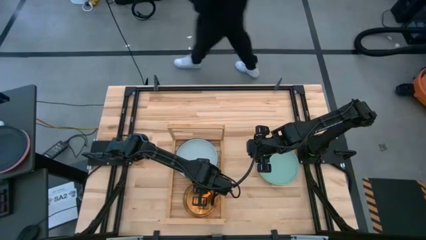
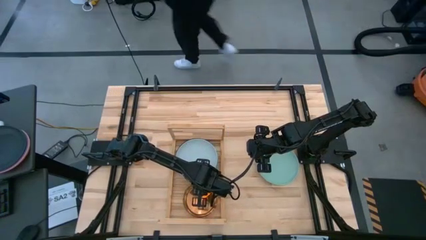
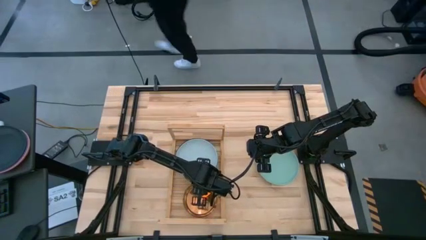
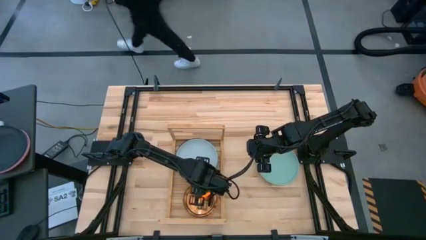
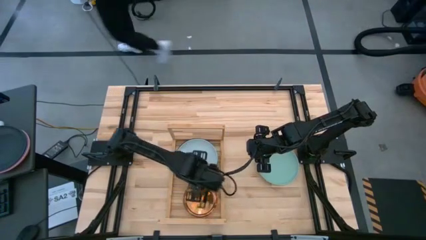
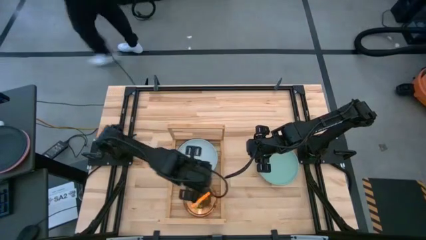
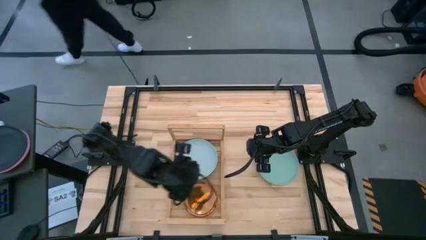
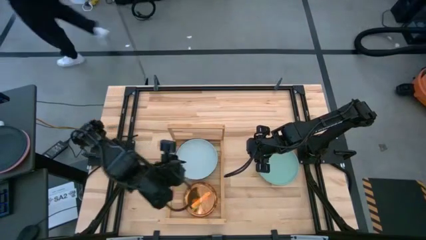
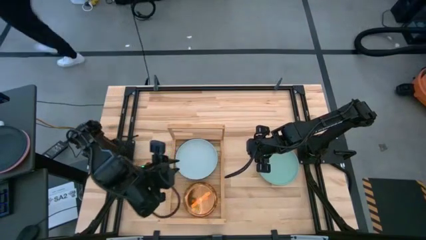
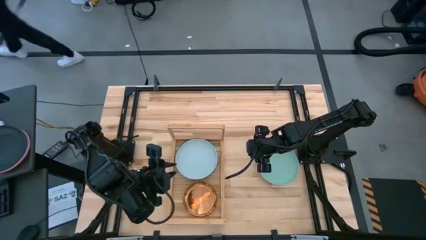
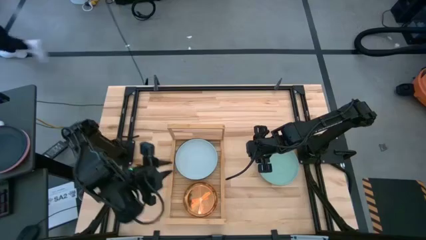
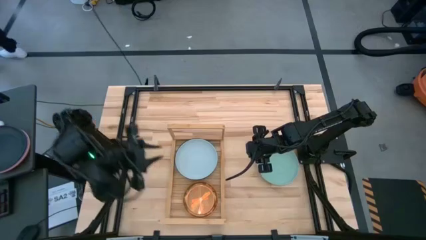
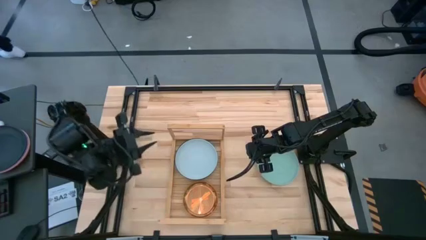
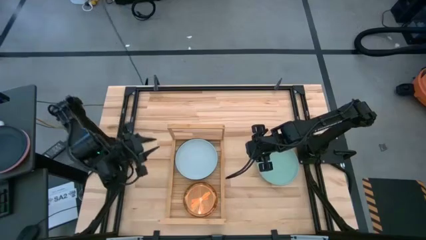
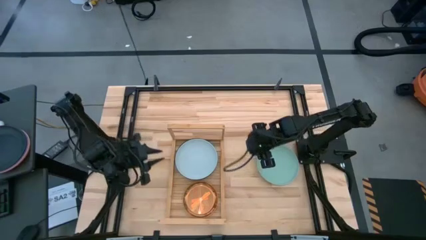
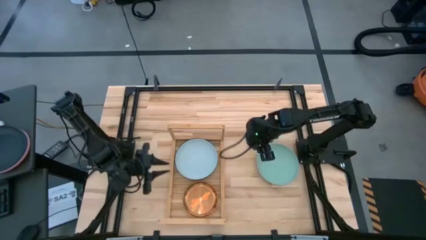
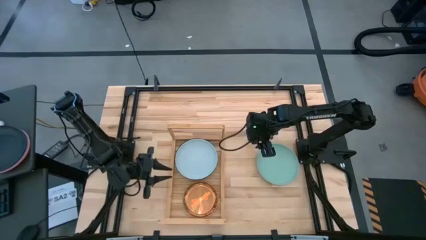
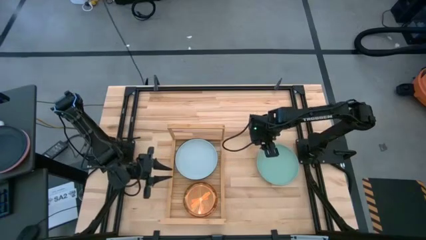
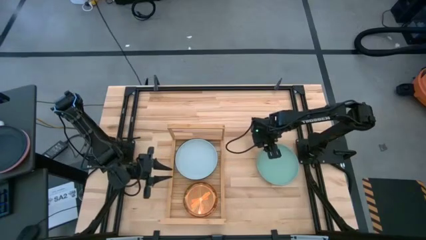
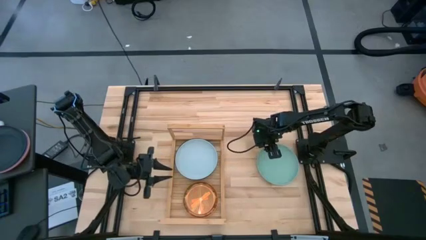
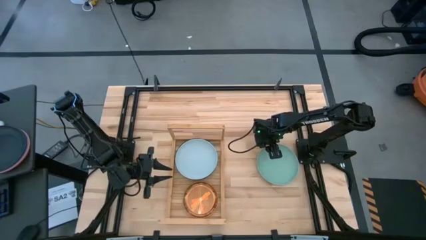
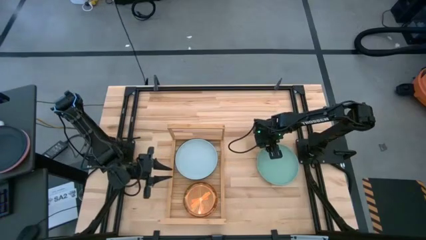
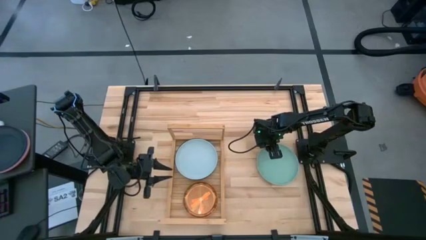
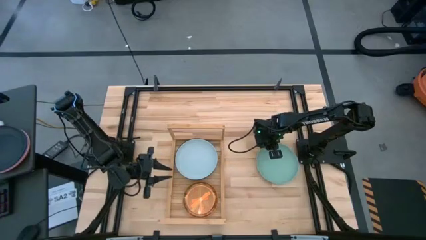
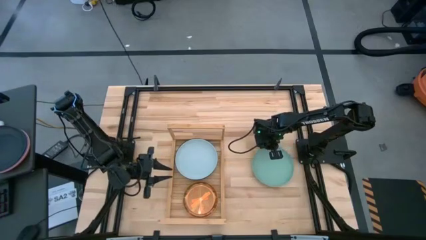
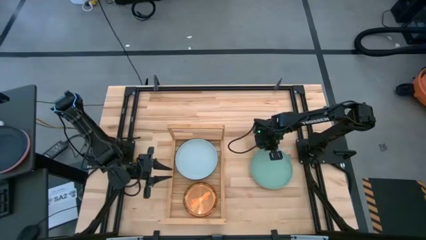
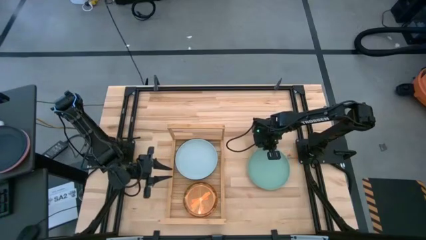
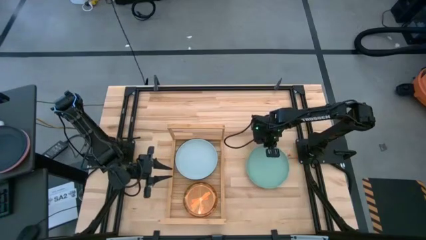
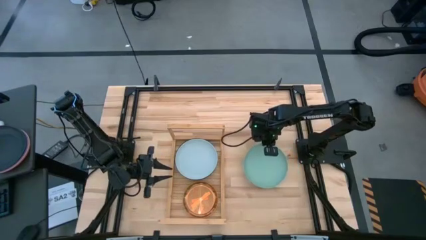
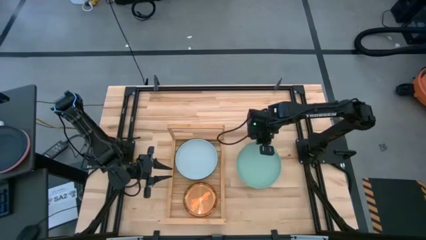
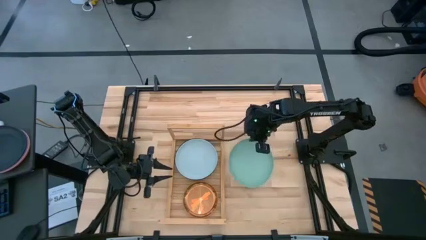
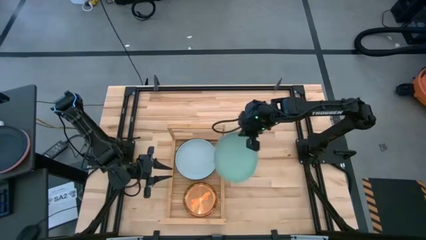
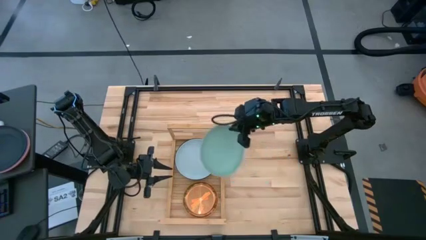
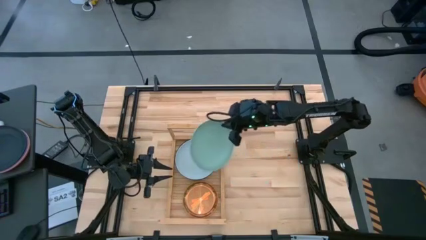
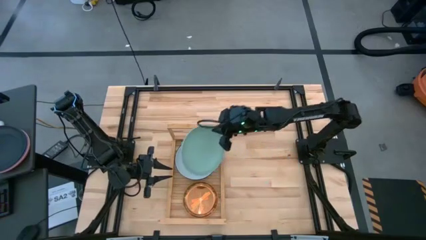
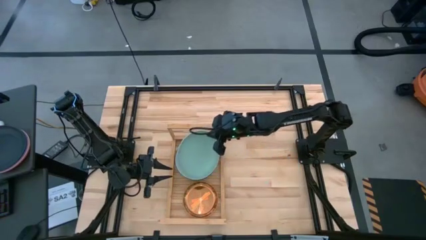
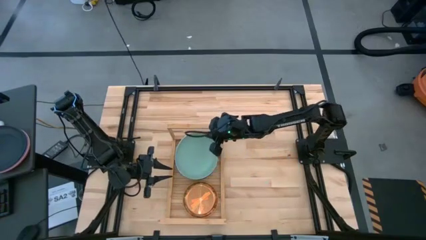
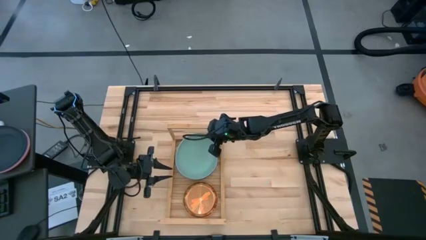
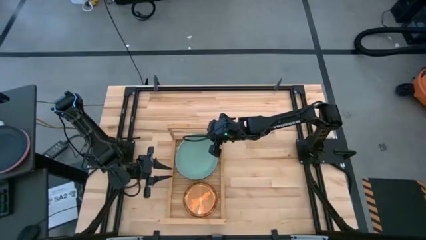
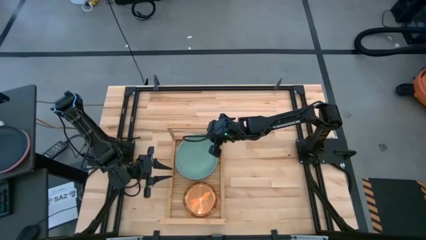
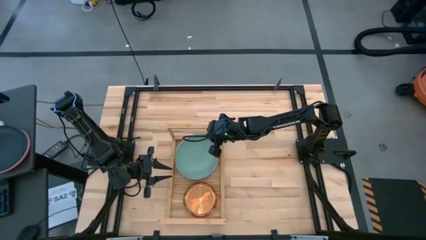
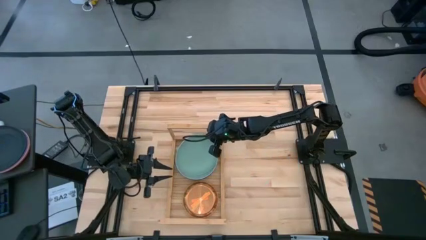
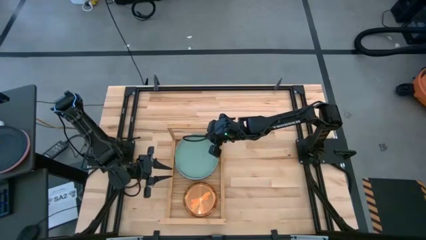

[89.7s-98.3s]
Task: Place and stack plates onto a shelf
Stack the big green plate on top of the big gray plate on the shelf

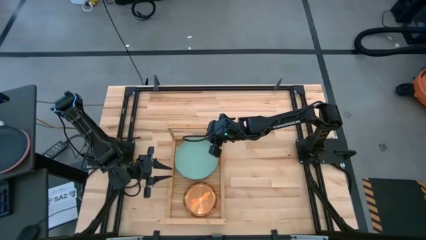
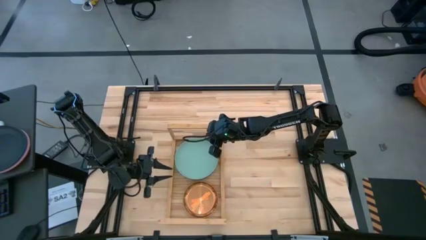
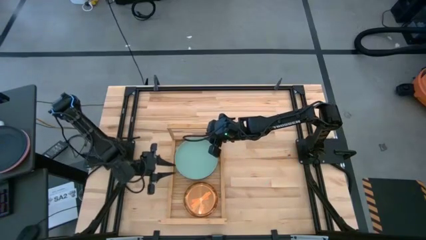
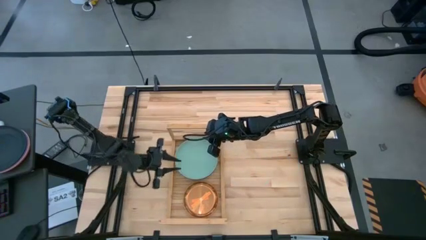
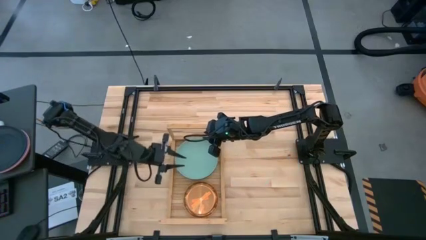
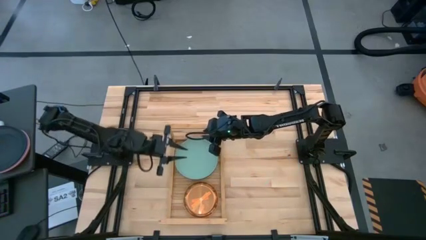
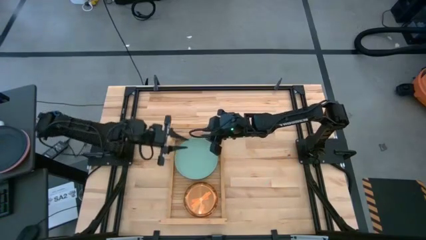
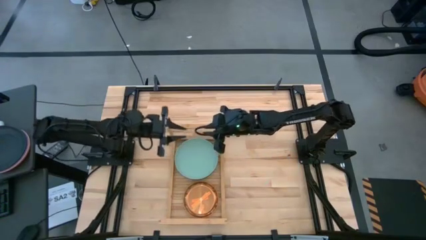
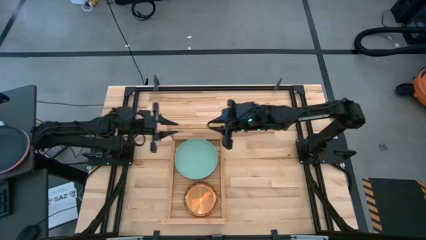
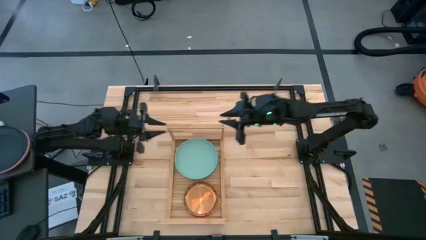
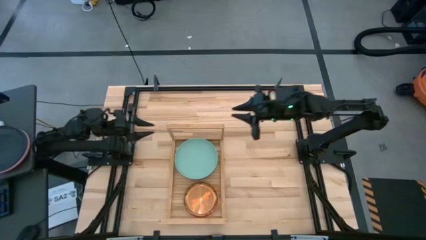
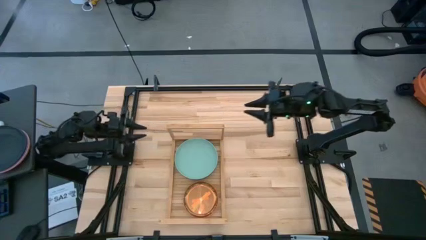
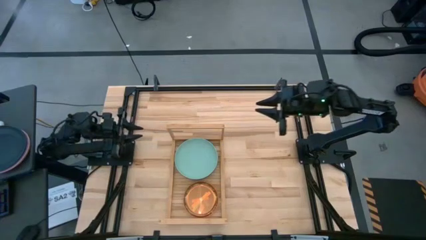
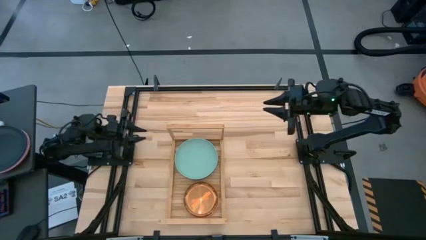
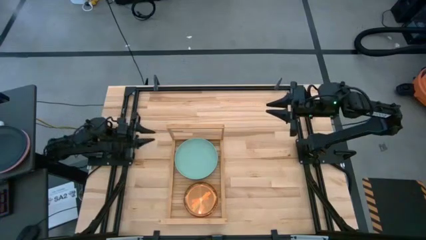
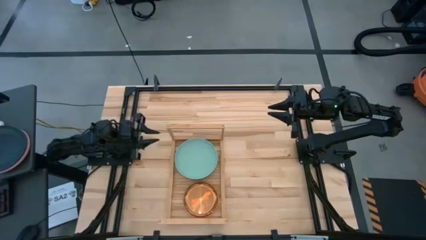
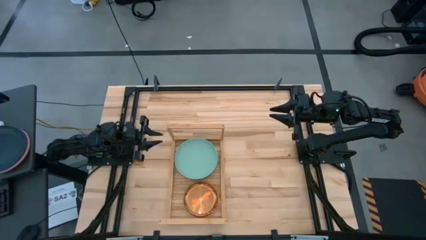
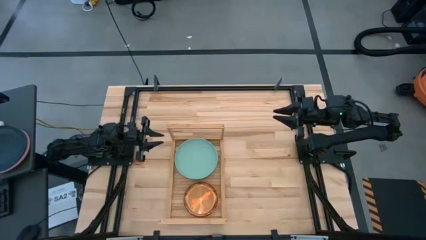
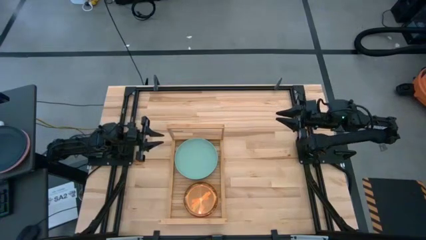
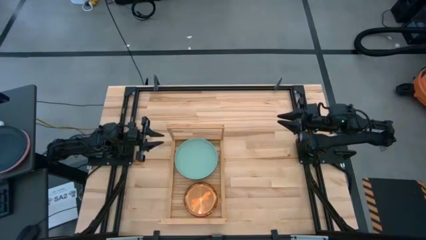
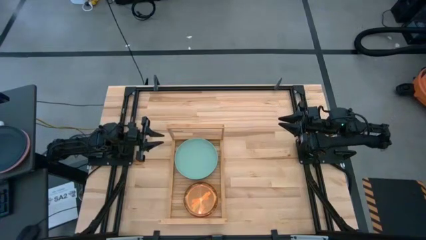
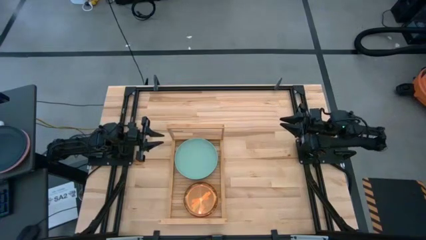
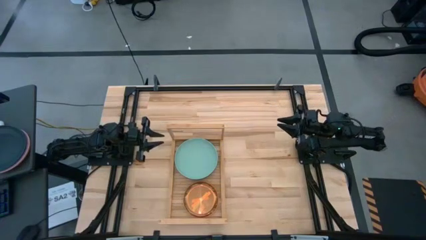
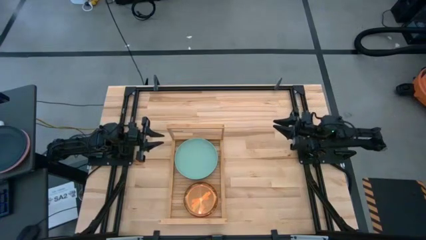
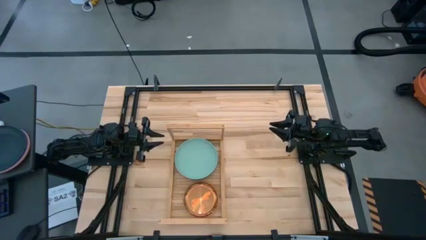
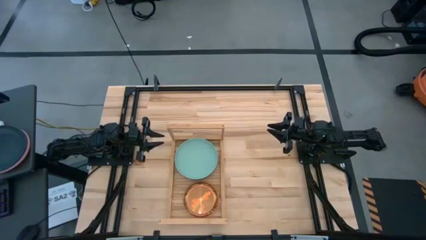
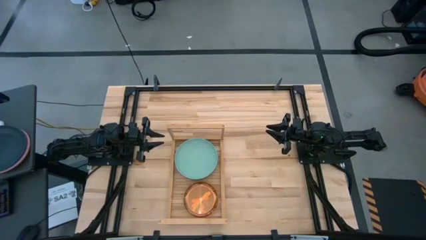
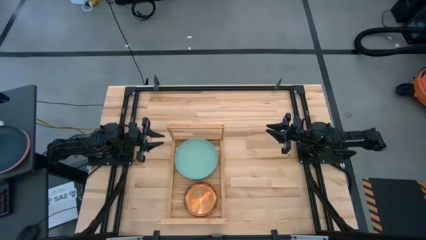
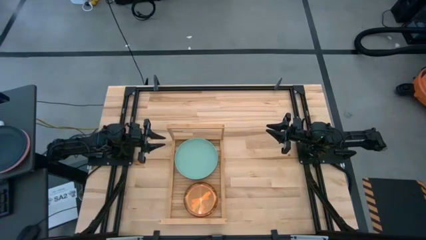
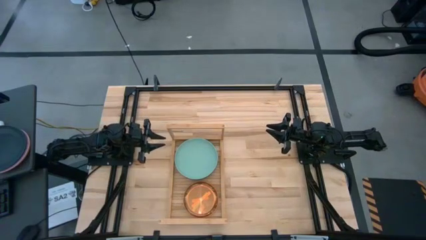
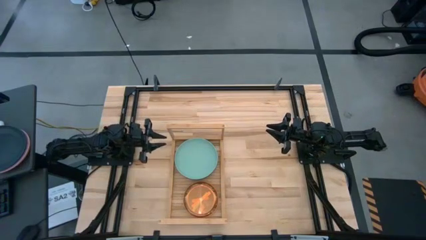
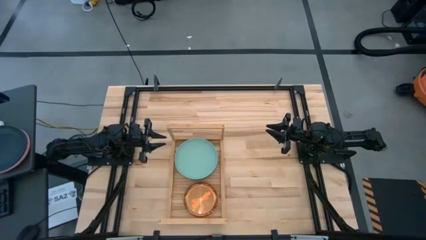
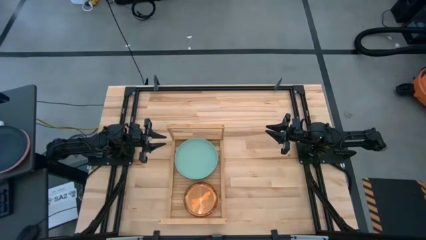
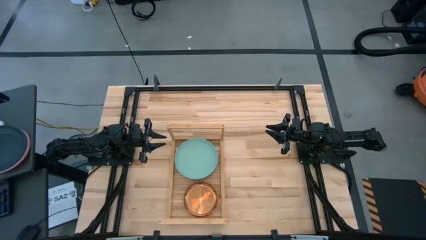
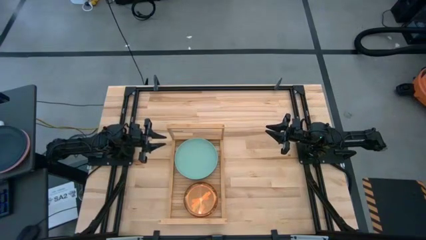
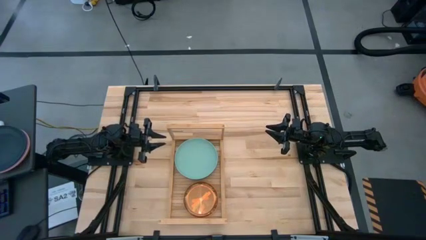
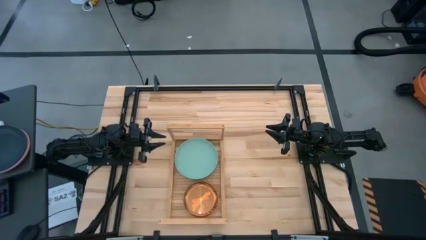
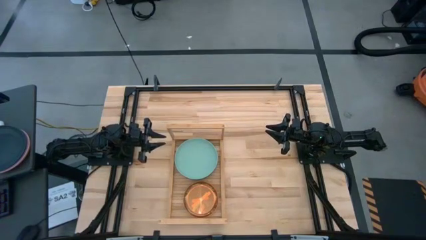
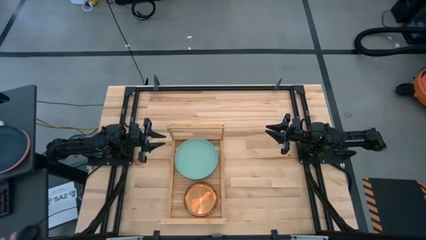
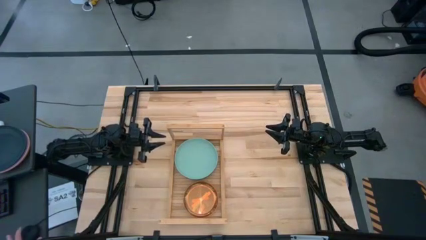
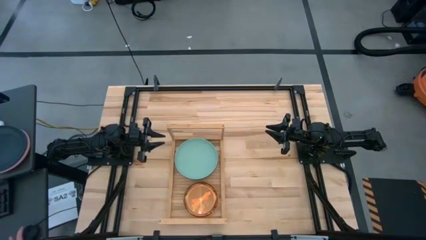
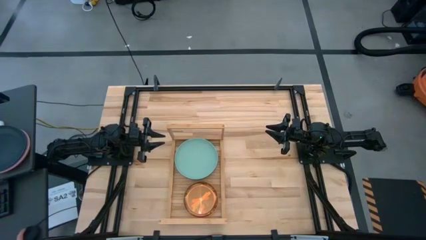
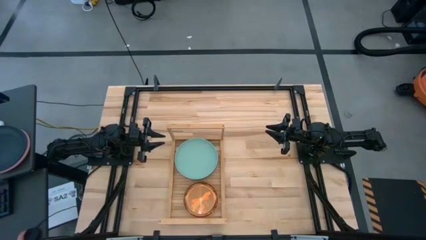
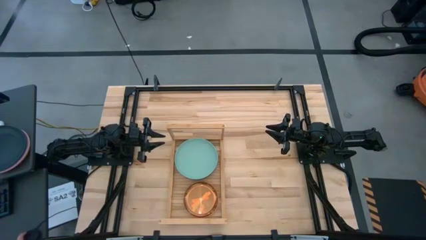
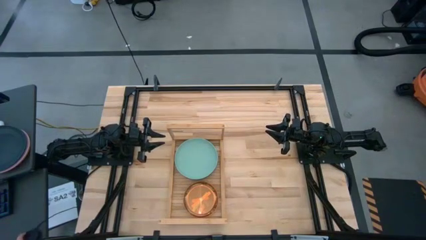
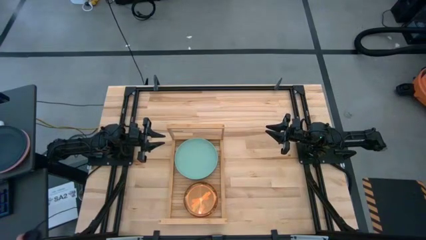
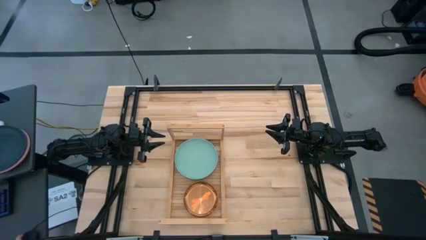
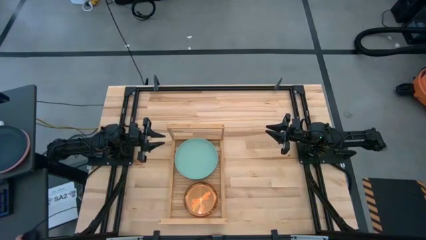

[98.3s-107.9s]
Return to Home Position
